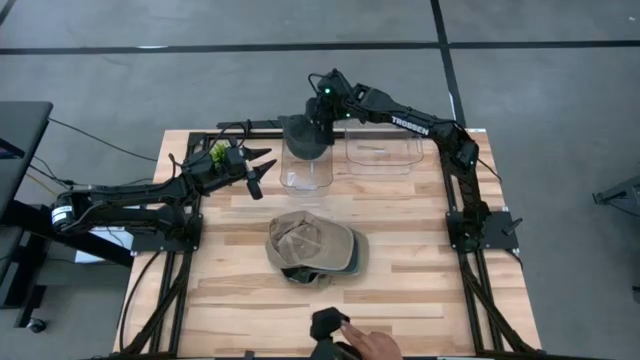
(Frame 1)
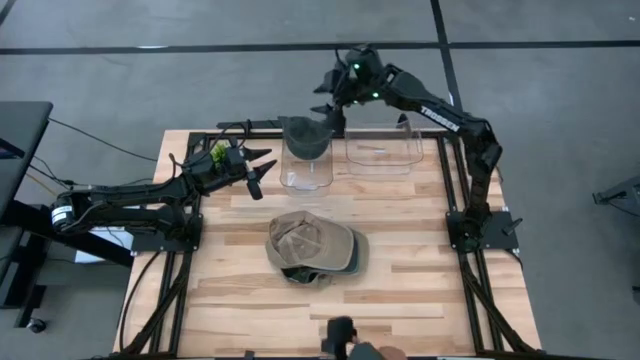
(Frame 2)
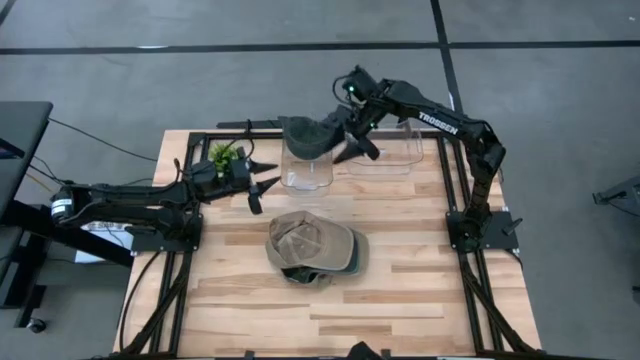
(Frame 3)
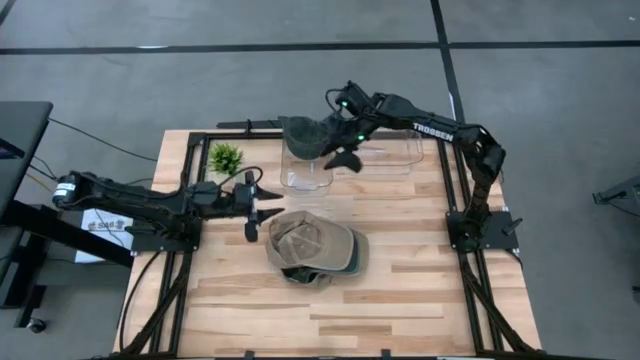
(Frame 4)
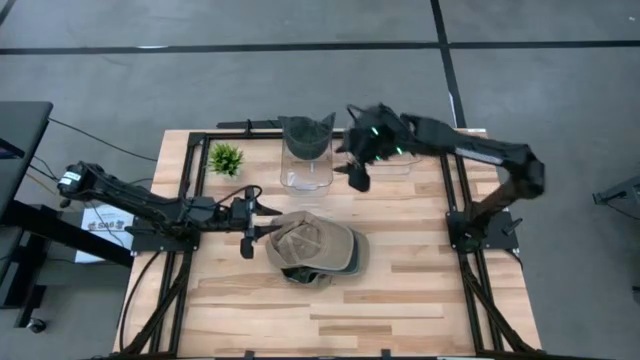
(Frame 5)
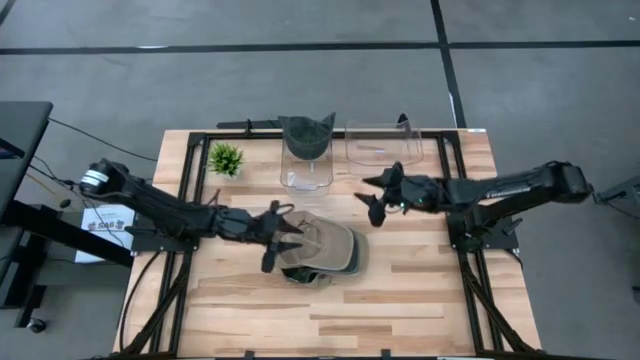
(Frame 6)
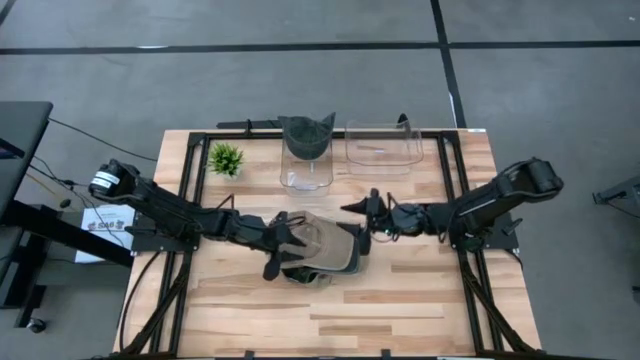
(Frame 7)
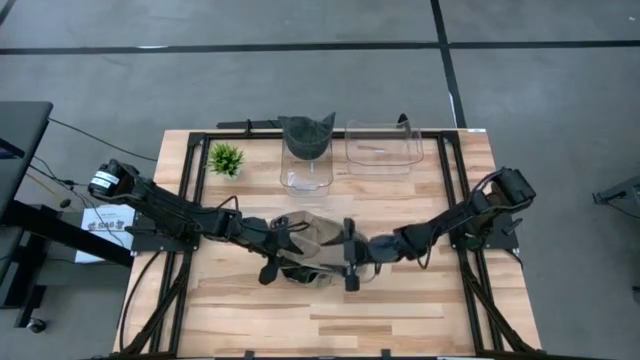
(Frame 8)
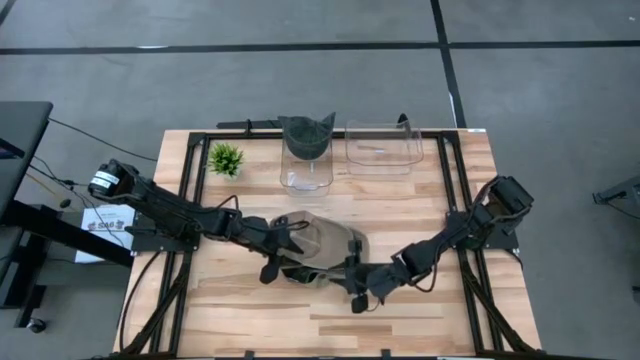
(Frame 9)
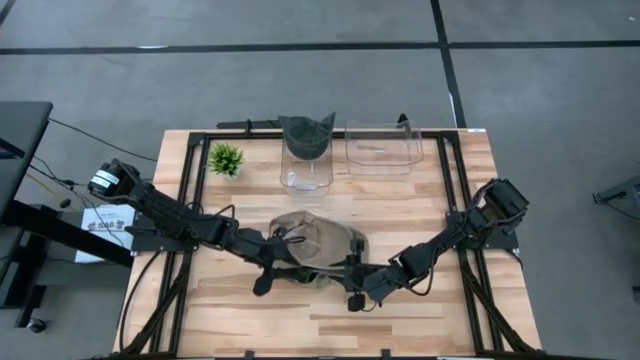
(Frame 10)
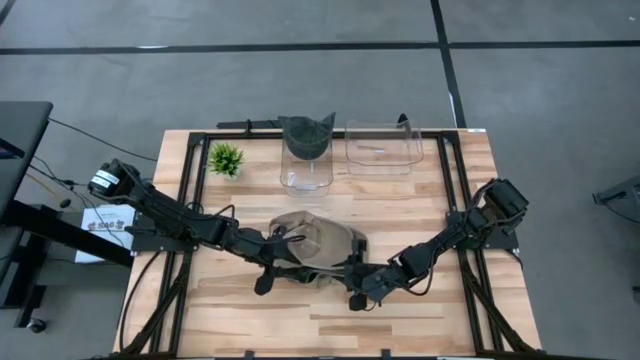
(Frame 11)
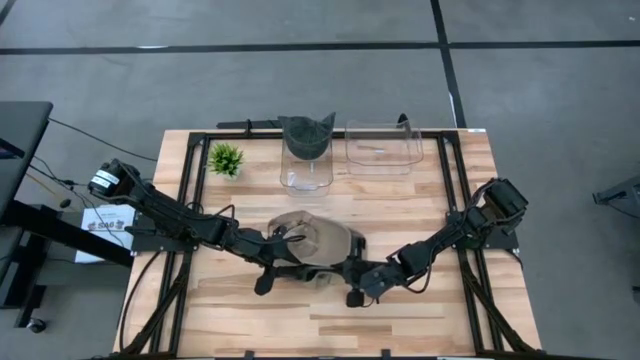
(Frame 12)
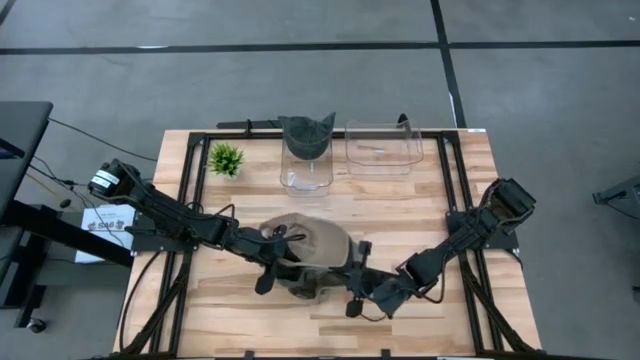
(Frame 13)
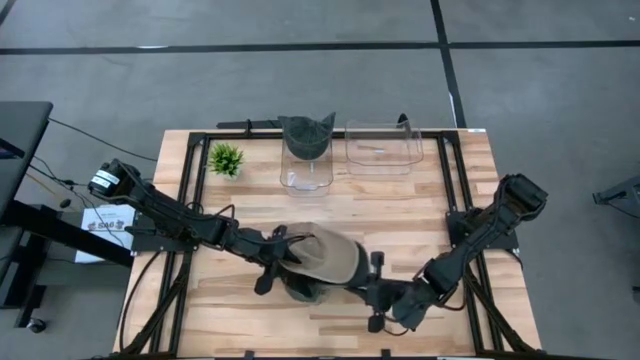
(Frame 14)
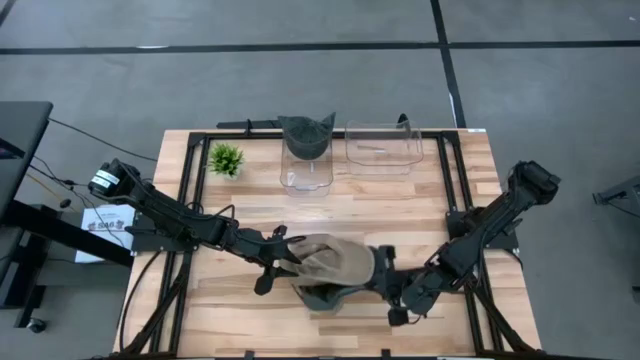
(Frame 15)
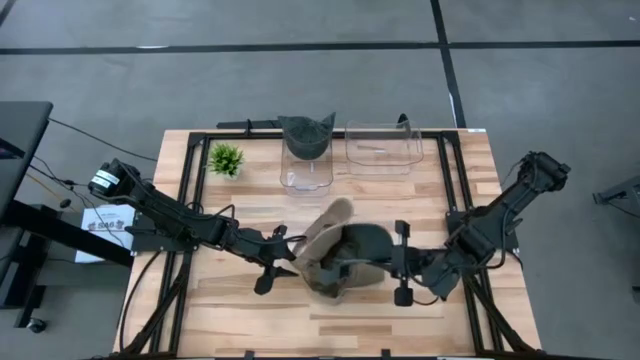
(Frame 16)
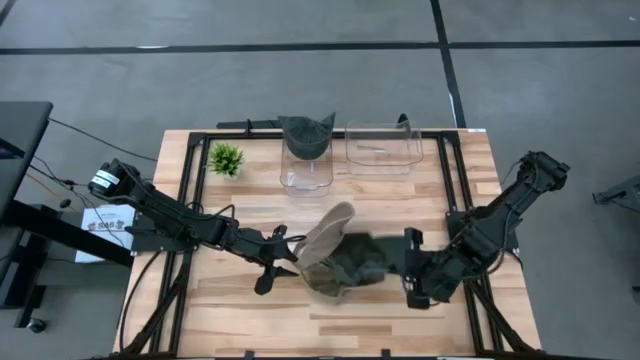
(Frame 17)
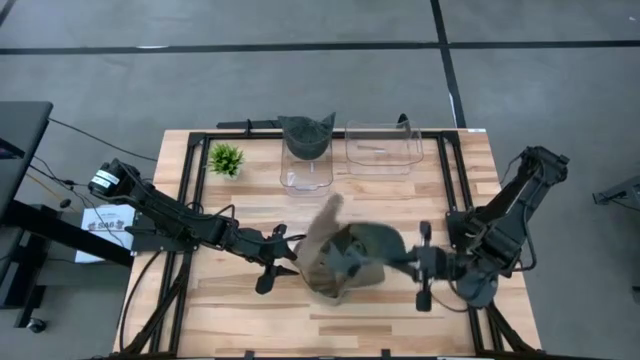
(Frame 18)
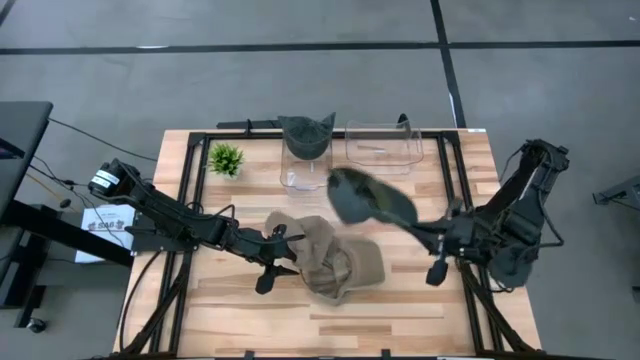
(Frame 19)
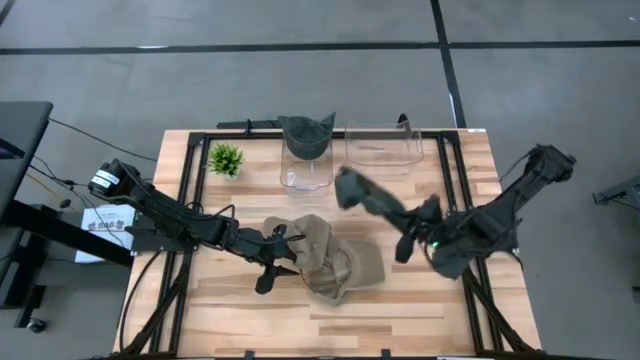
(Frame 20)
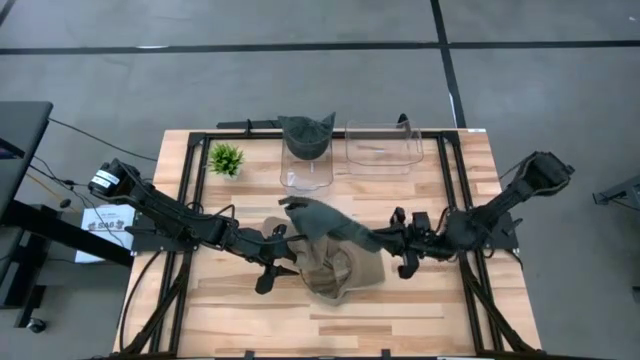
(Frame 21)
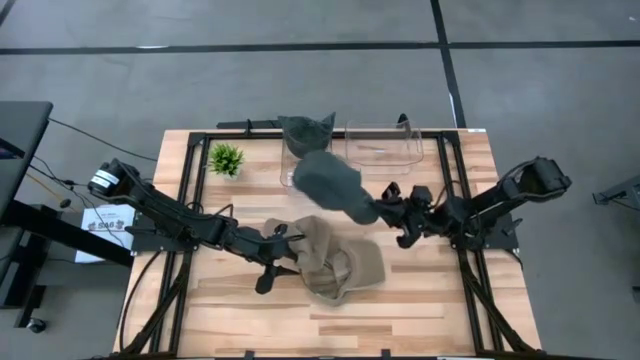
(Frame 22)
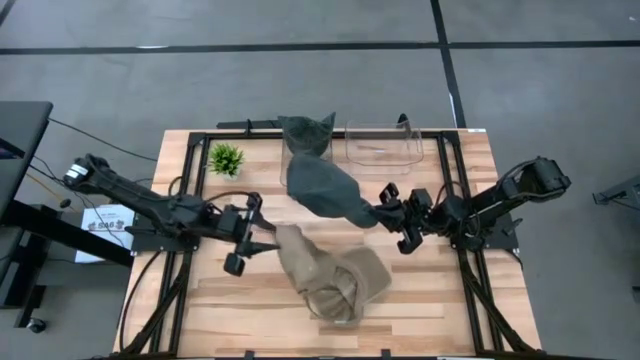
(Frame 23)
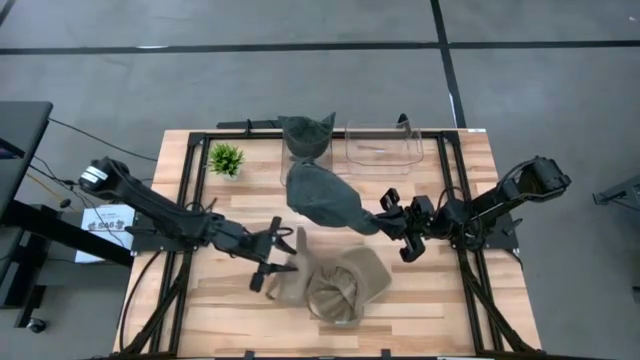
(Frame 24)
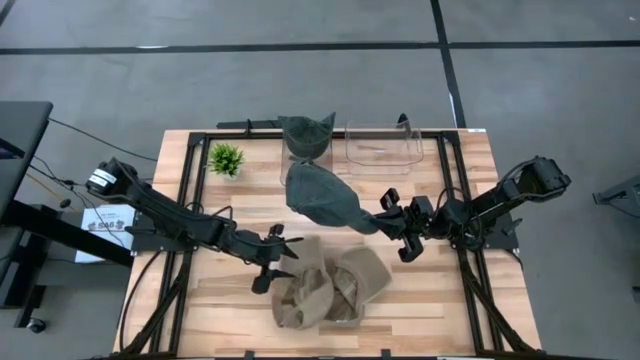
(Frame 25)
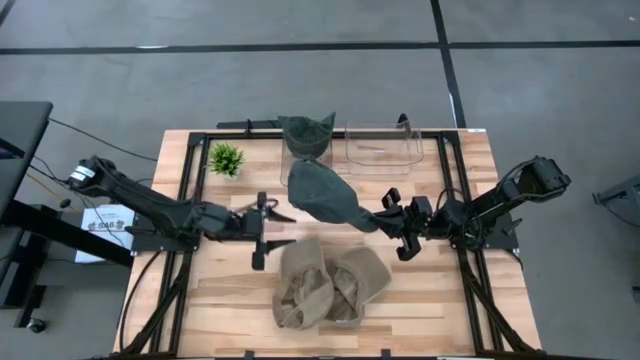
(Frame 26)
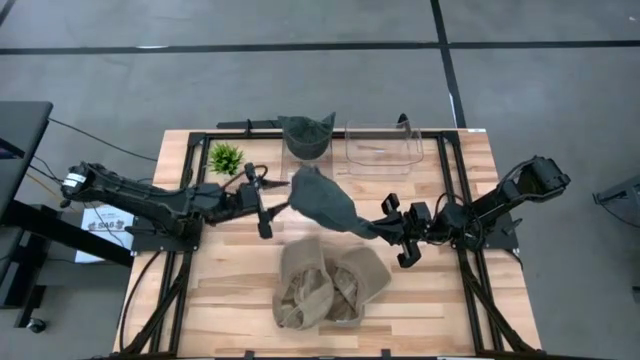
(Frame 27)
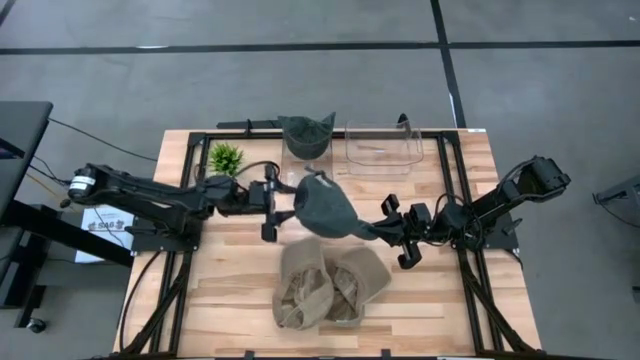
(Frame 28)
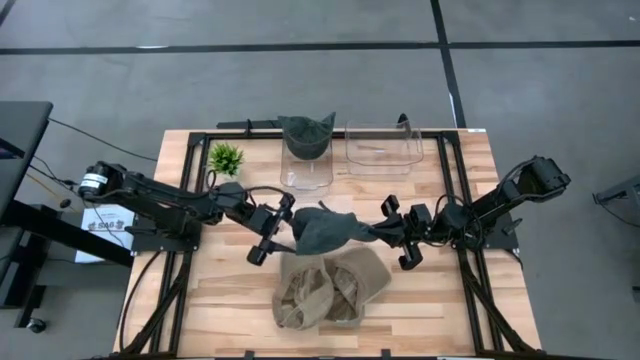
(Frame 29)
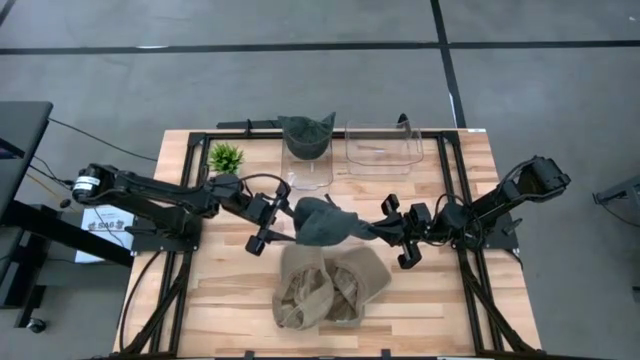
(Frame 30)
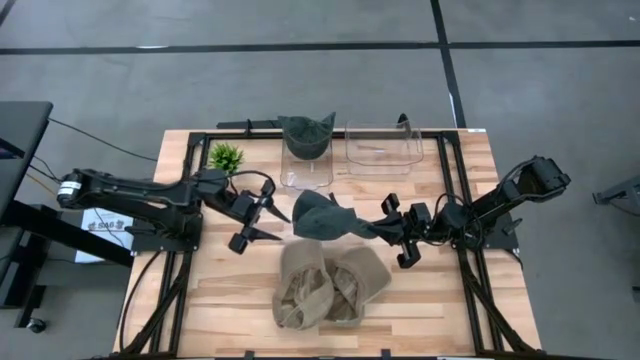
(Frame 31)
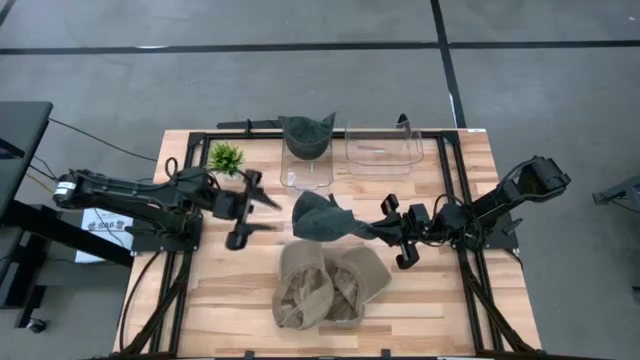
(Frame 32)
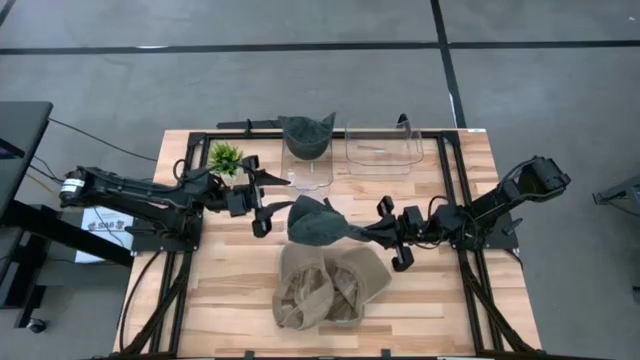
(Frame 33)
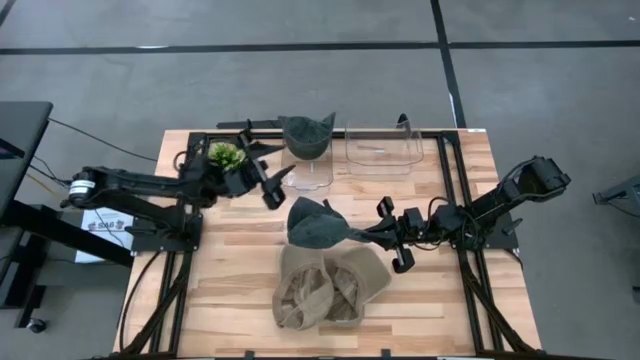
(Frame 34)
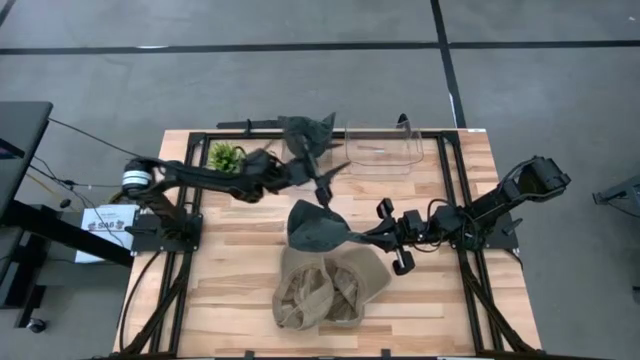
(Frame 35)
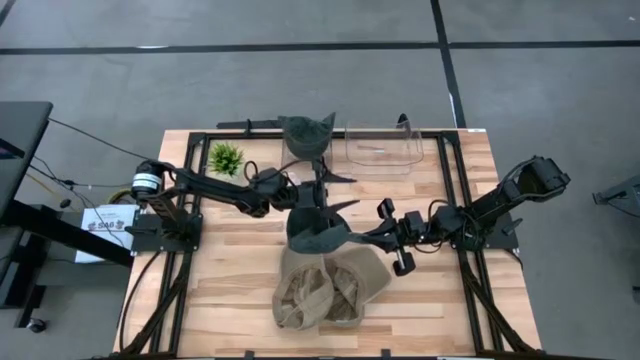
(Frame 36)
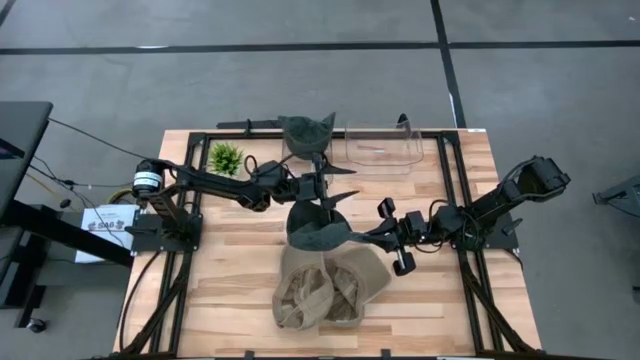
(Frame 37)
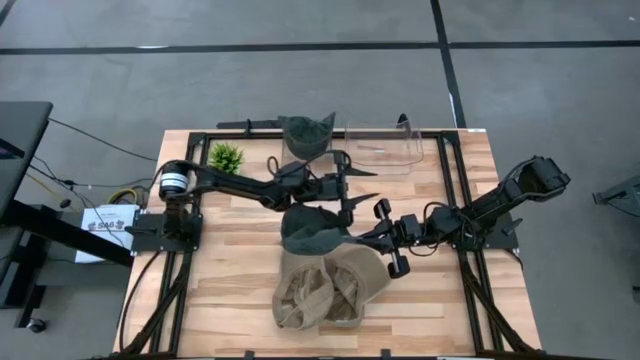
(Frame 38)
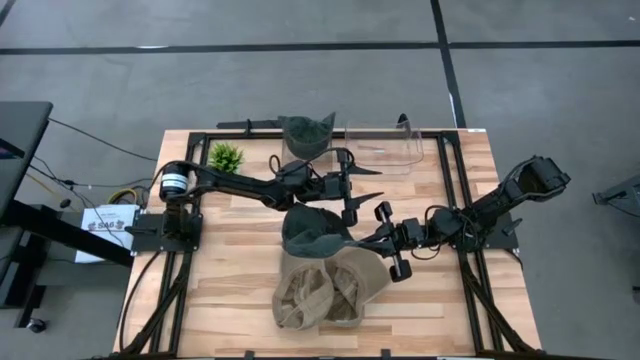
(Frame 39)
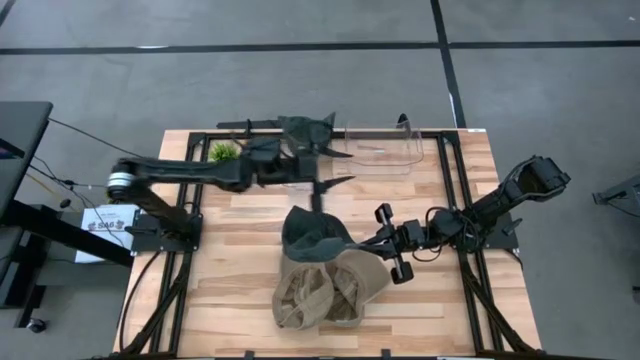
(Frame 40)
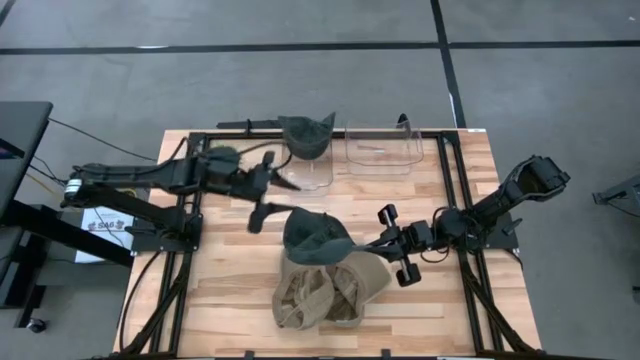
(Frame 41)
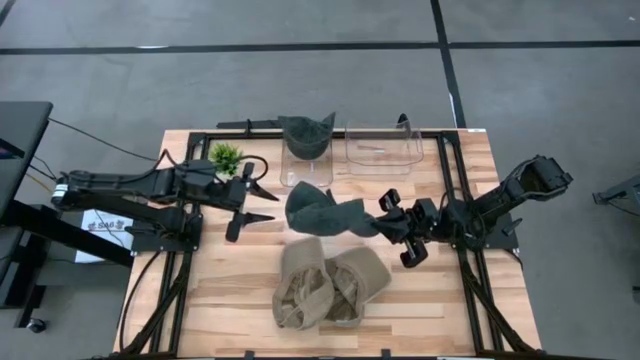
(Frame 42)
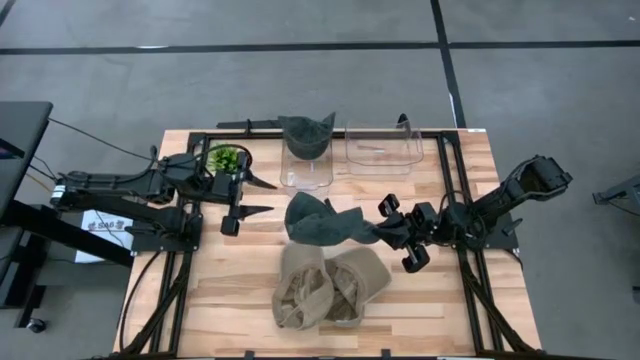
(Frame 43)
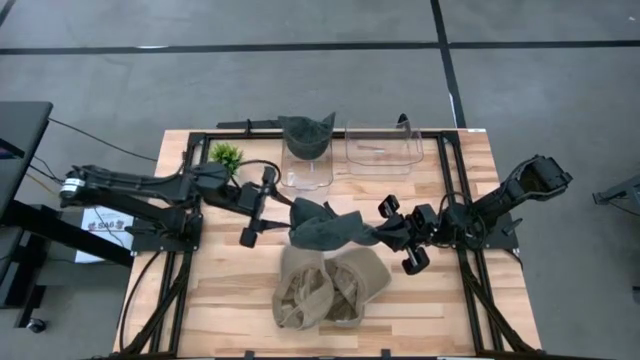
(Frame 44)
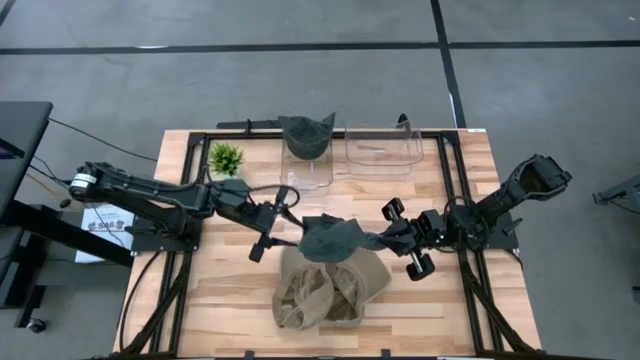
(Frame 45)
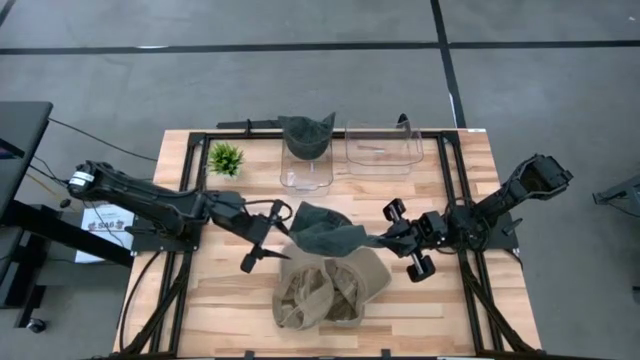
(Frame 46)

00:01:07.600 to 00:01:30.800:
Task: Pick & Place hat
Put the black cap into the left transparent bin
